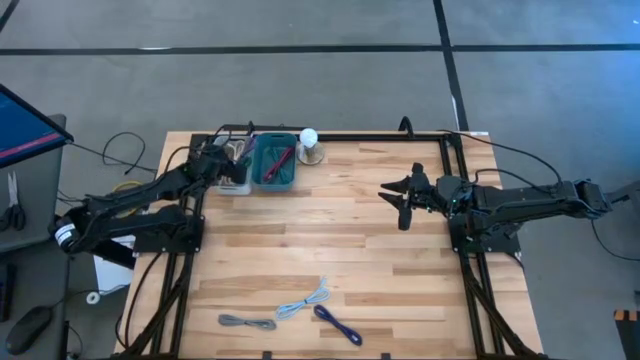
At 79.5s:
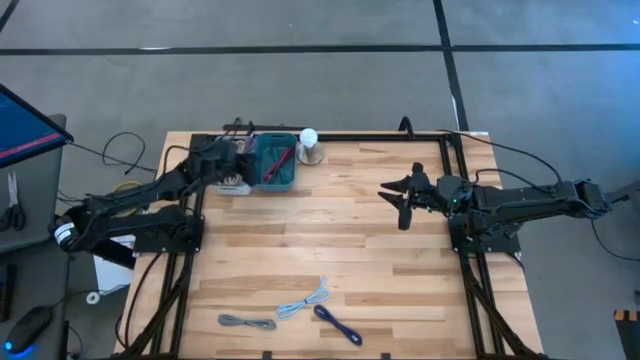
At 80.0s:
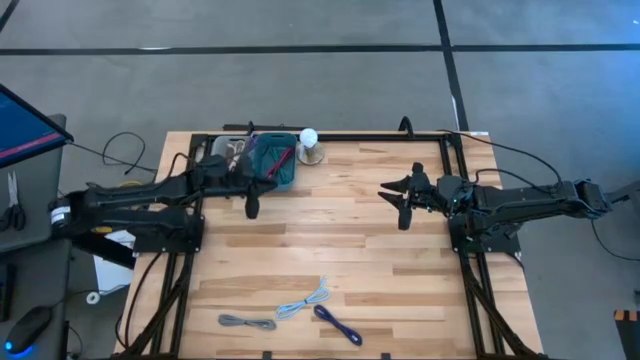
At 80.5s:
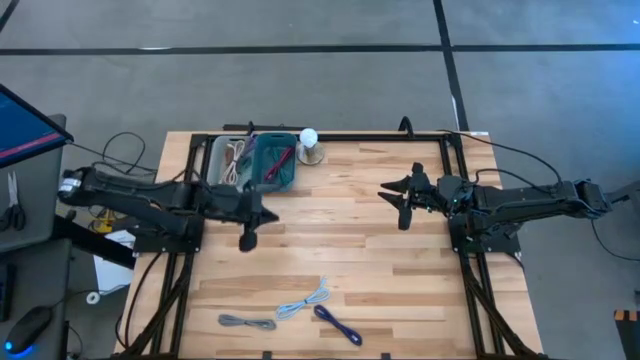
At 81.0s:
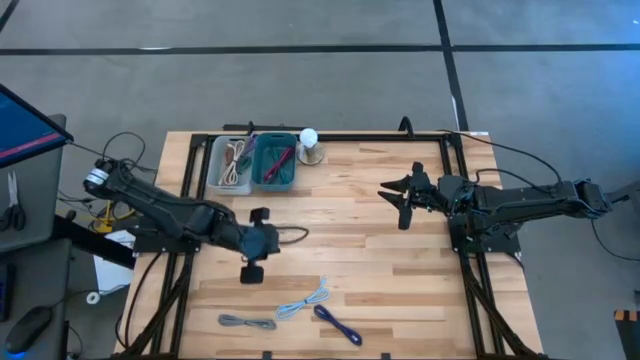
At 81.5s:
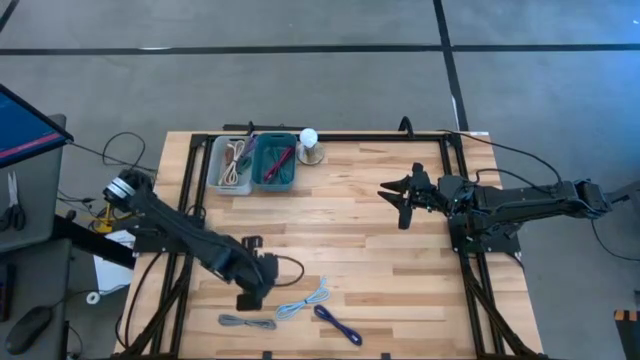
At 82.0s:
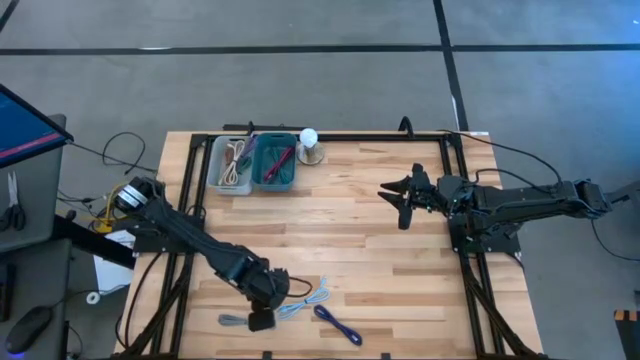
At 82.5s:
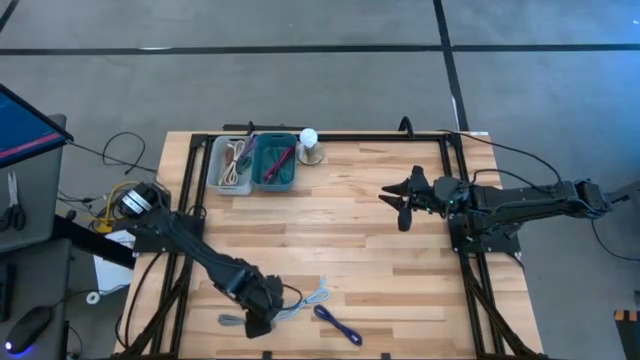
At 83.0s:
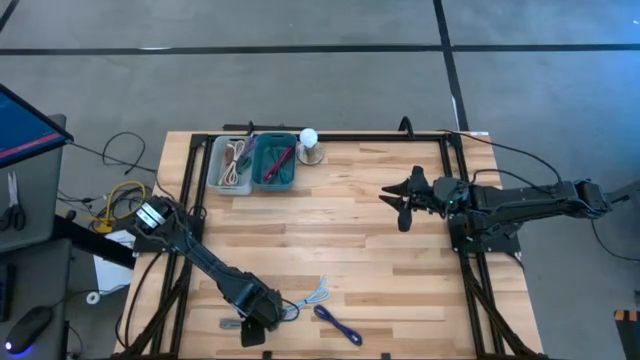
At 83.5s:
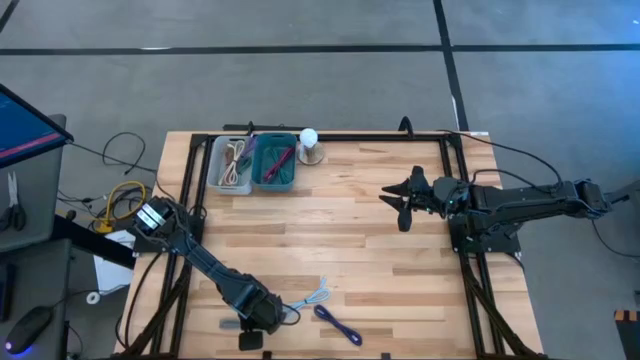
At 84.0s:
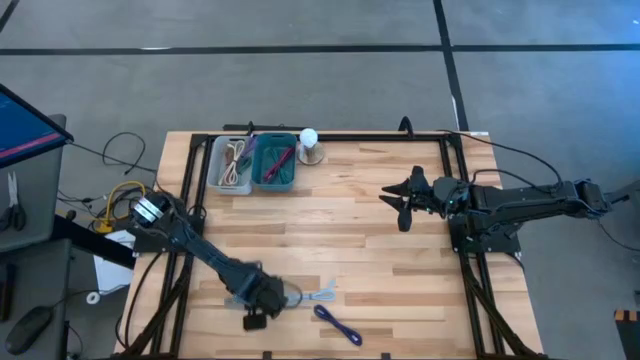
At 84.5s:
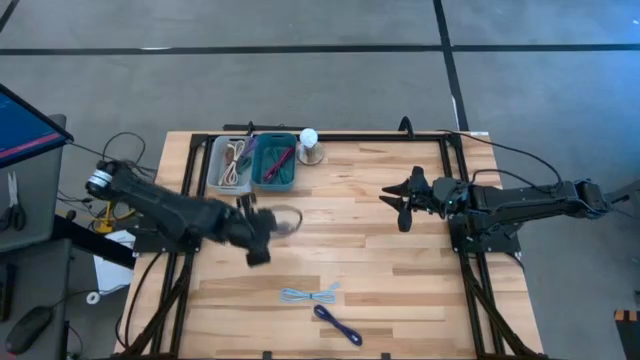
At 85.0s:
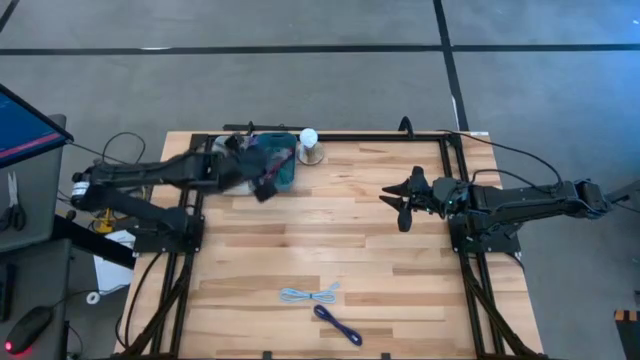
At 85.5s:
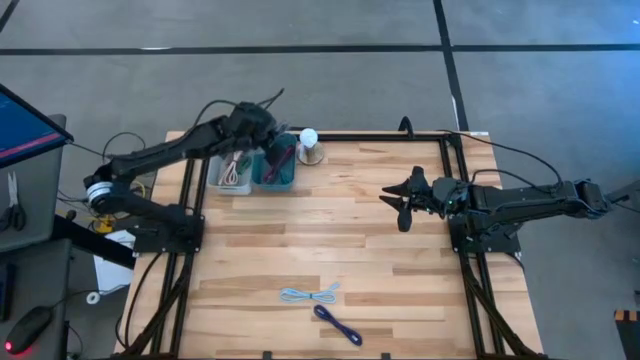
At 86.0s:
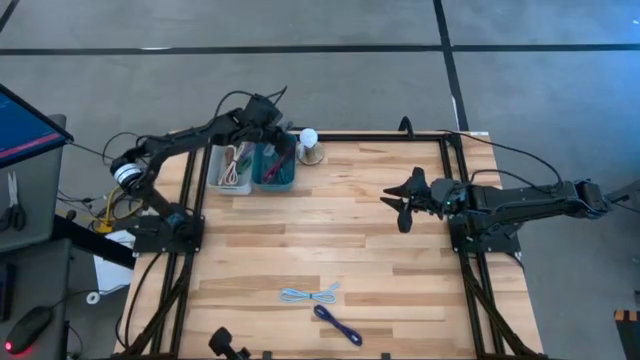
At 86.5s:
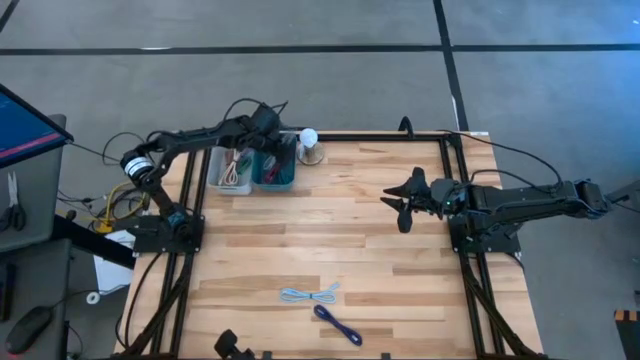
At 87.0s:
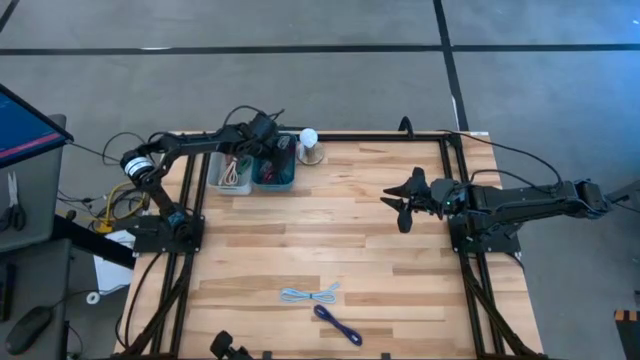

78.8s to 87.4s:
Task: Pick & Place USB Port
Put the white patterned charger cable into the blue bin

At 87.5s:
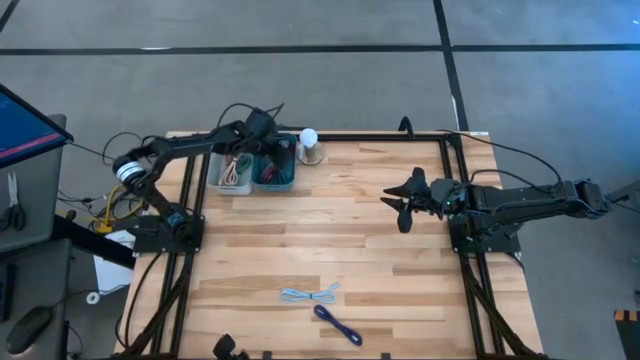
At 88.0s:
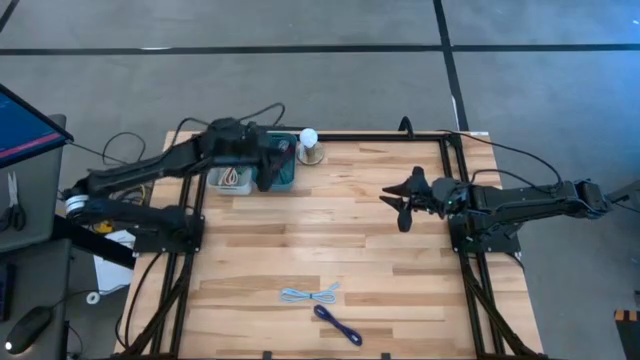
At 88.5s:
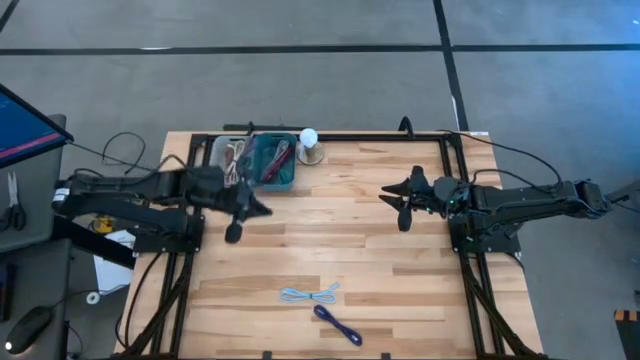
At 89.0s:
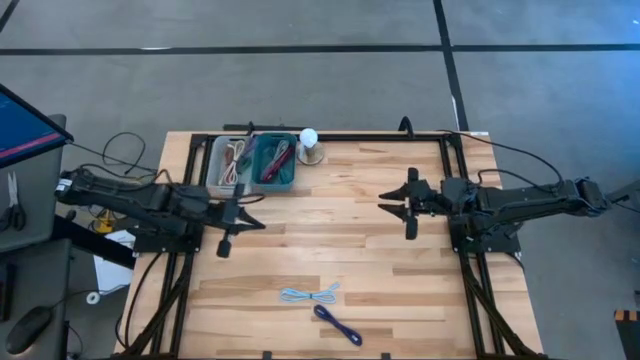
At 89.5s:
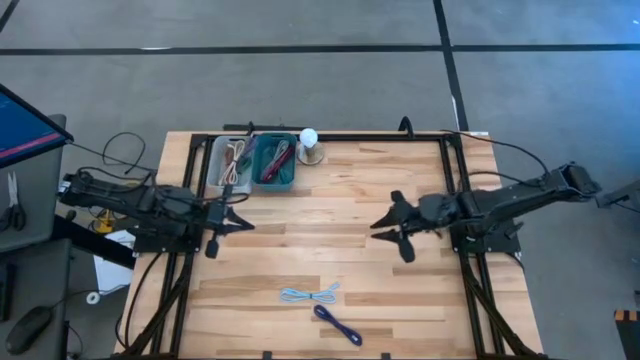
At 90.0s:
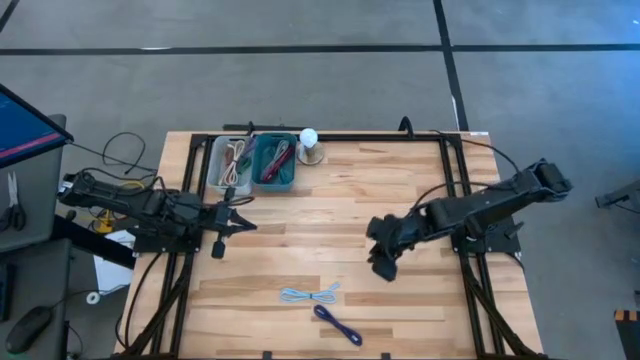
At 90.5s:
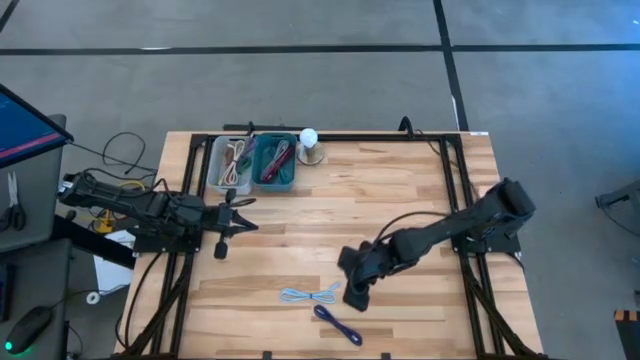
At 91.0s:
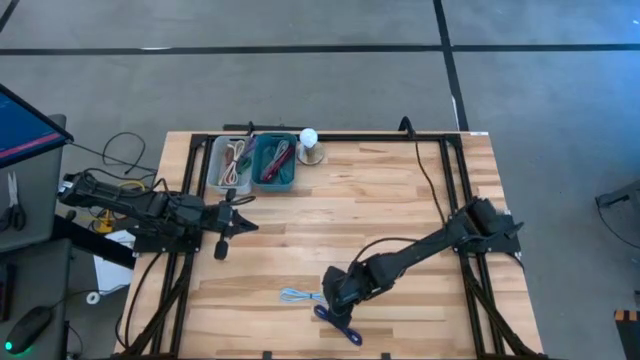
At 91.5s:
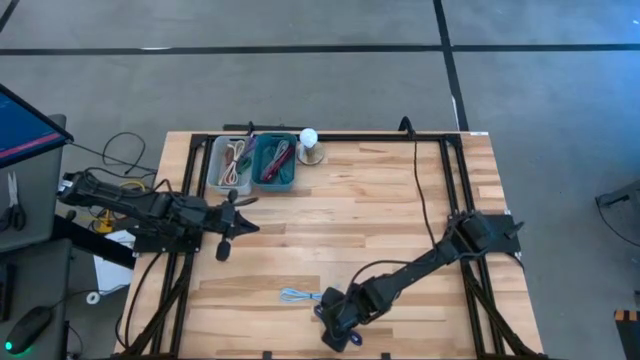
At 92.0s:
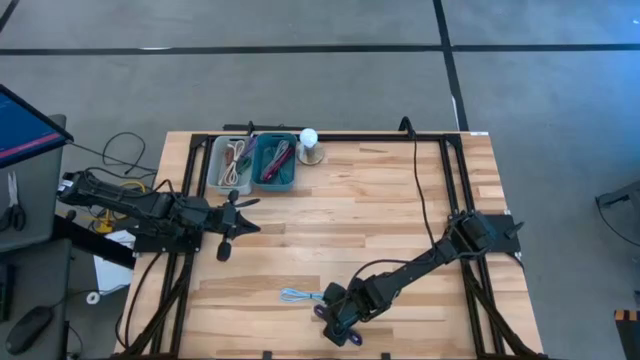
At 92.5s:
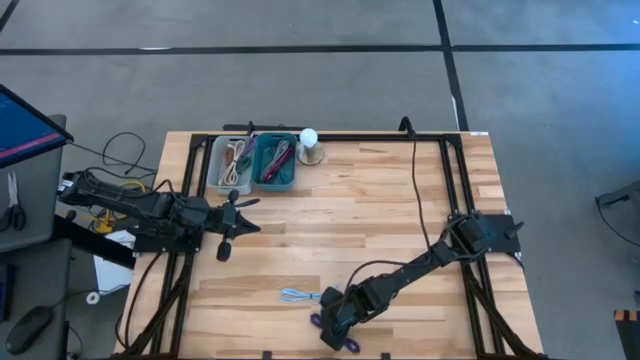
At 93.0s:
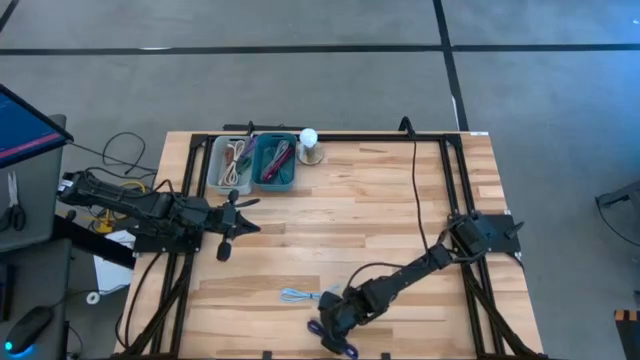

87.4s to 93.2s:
Put the purple patterned charger cable into the blue bin

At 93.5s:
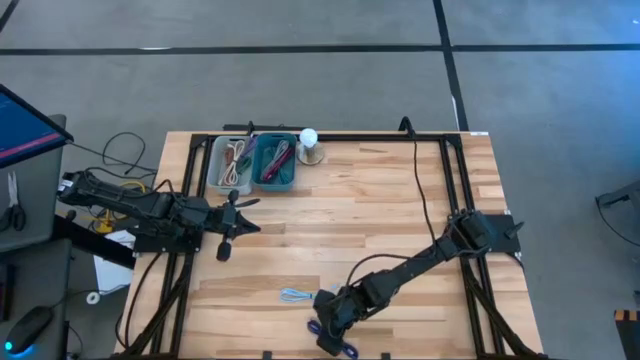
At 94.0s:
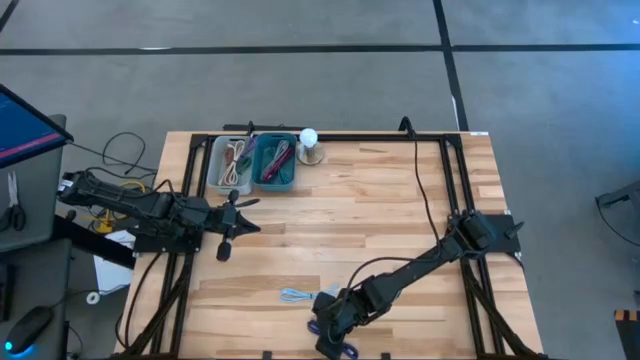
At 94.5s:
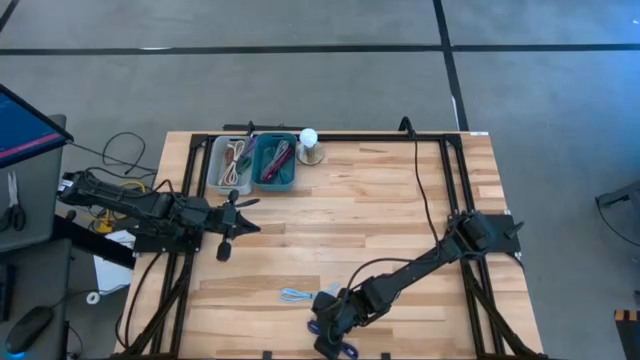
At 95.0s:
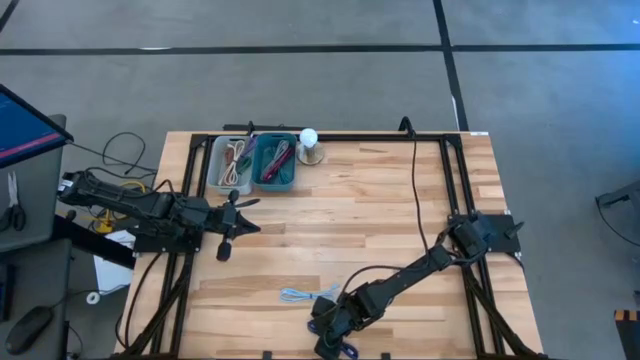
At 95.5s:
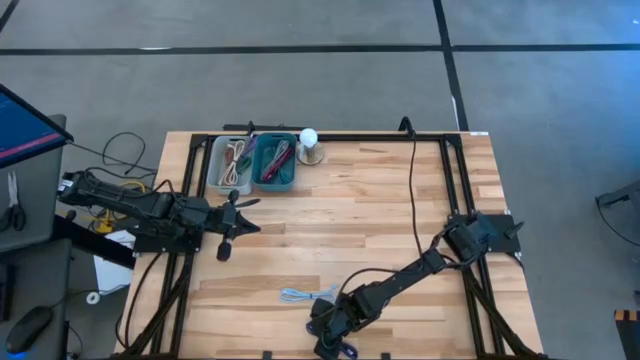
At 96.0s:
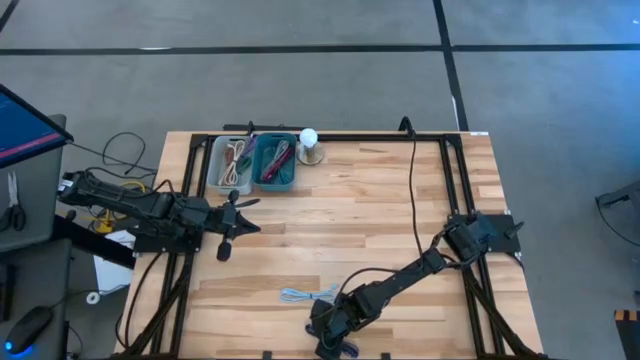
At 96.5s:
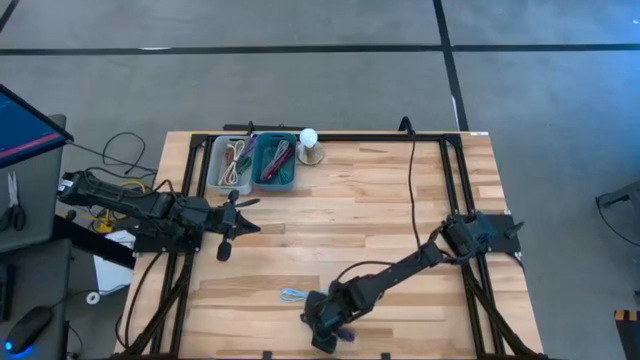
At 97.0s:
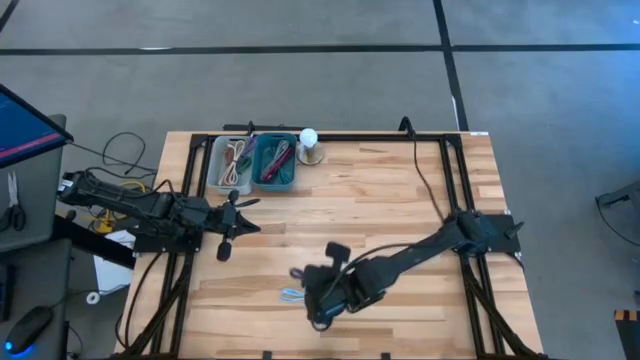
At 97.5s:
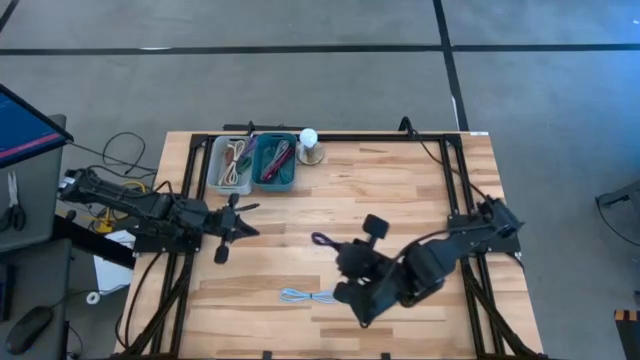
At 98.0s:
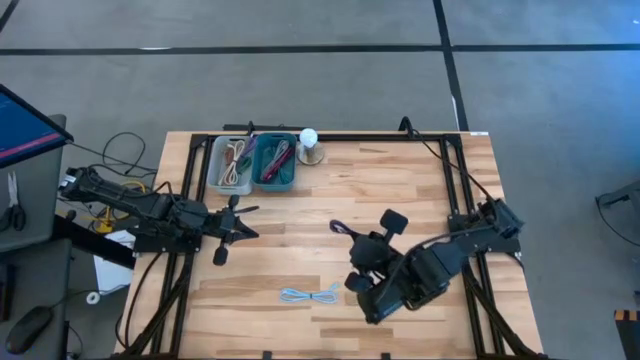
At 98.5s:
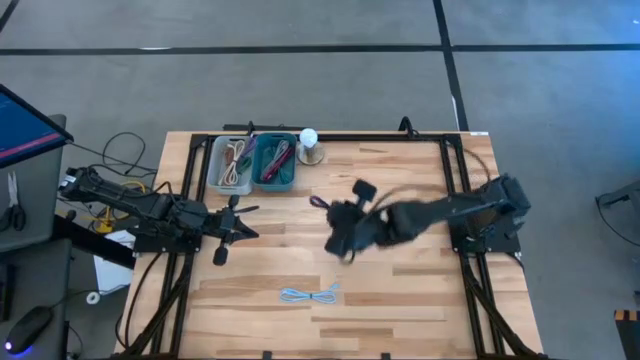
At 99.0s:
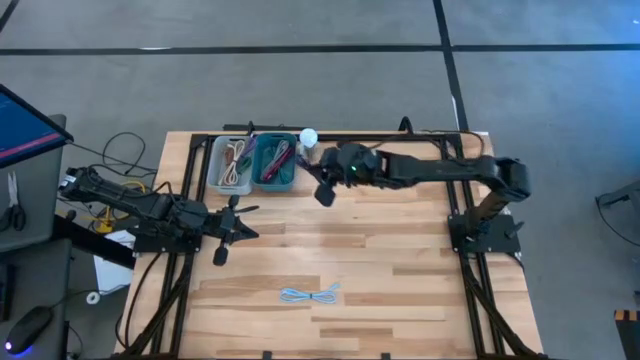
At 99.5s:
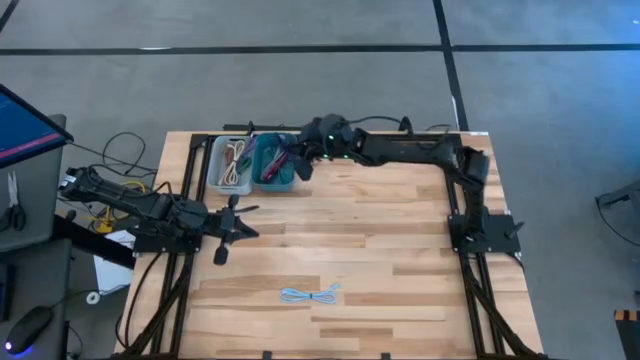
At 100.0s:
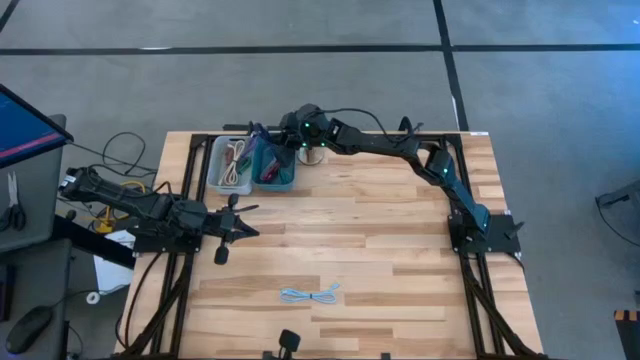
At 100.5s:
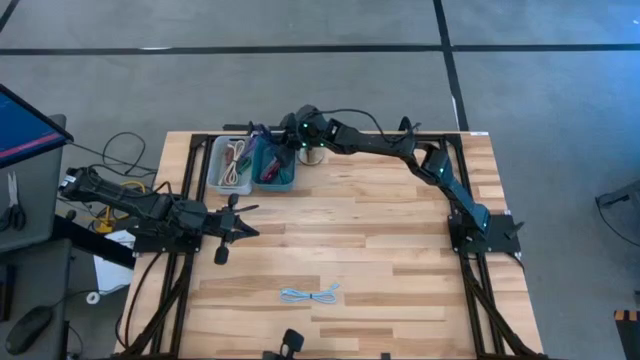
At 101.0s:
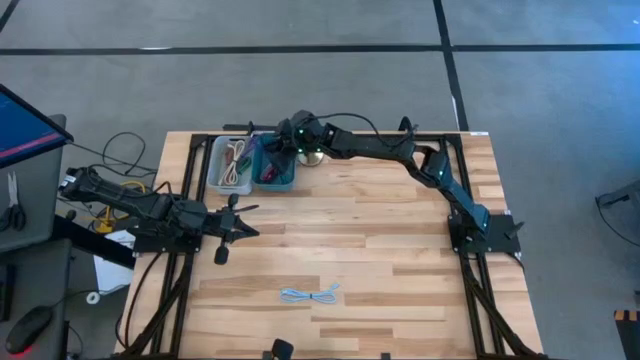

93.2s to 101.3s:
Put the purple patterned charger cable into the blue bin
